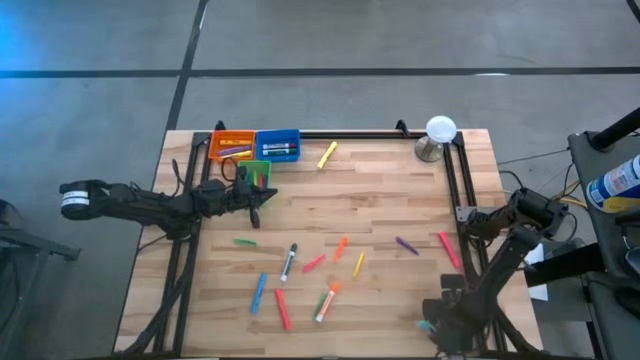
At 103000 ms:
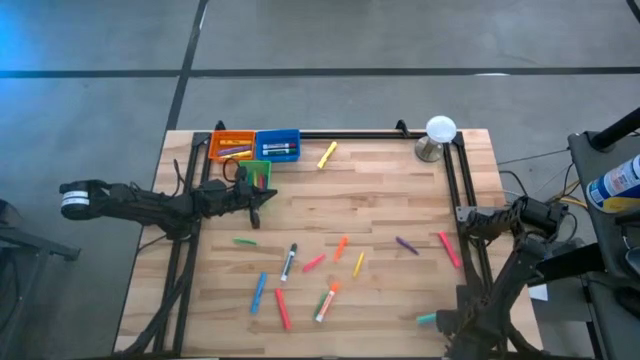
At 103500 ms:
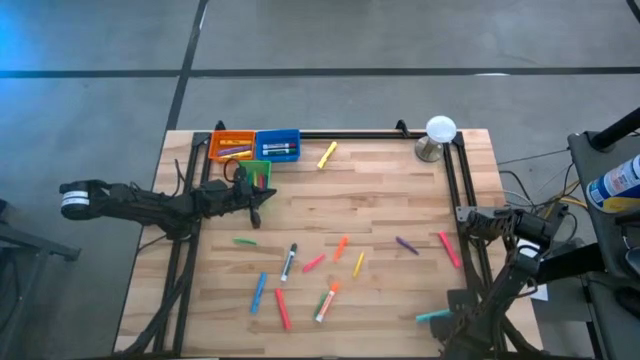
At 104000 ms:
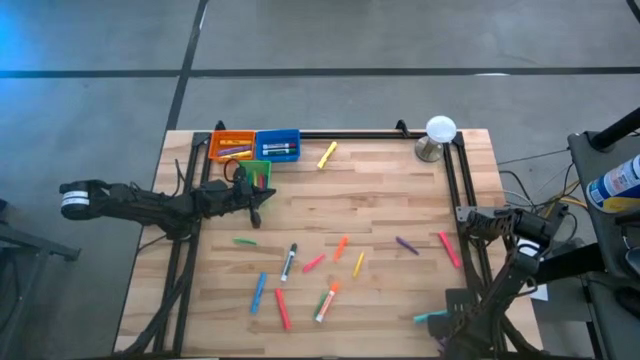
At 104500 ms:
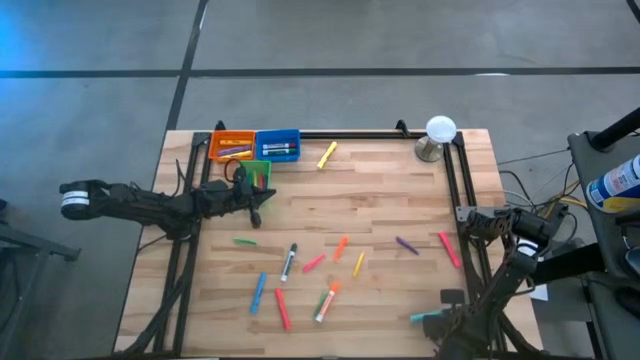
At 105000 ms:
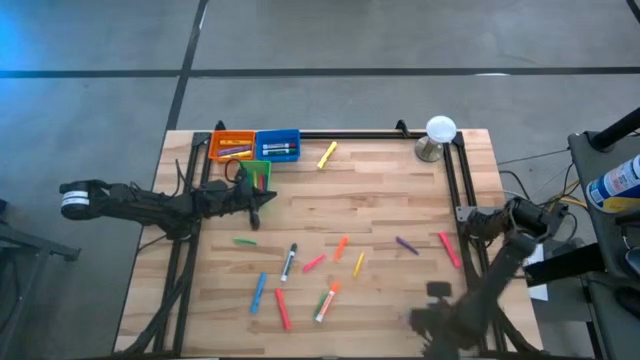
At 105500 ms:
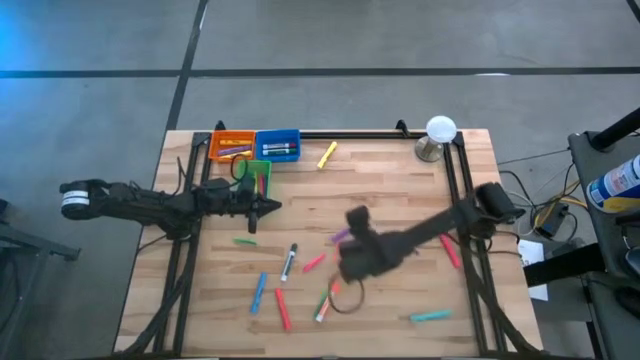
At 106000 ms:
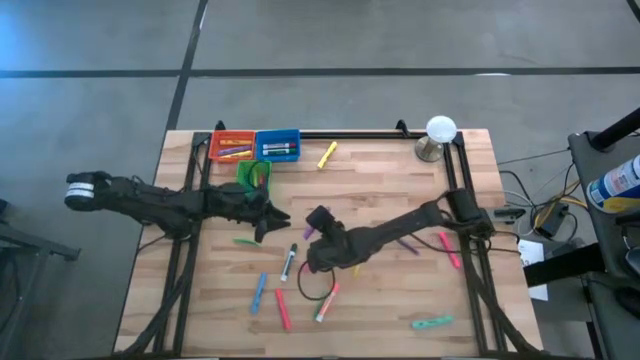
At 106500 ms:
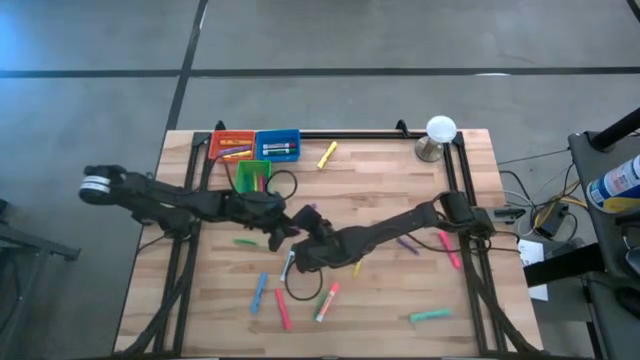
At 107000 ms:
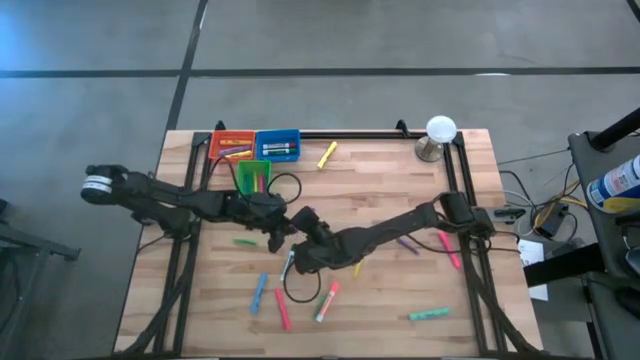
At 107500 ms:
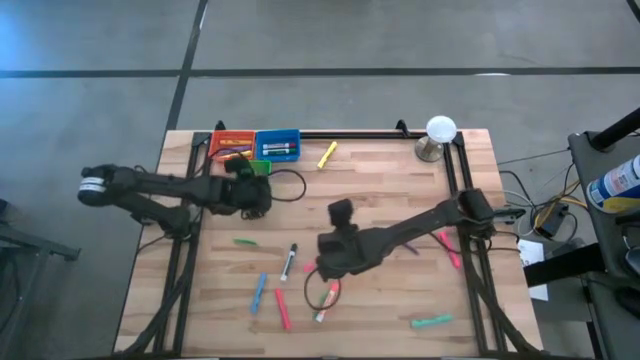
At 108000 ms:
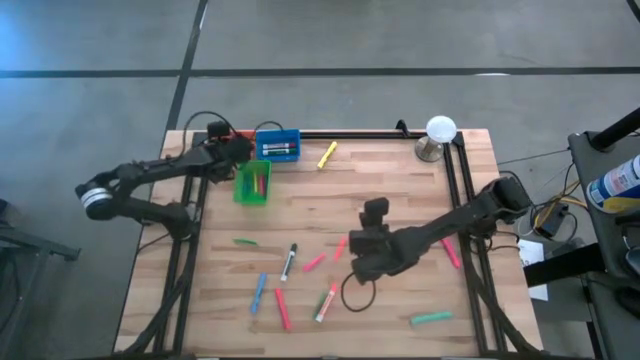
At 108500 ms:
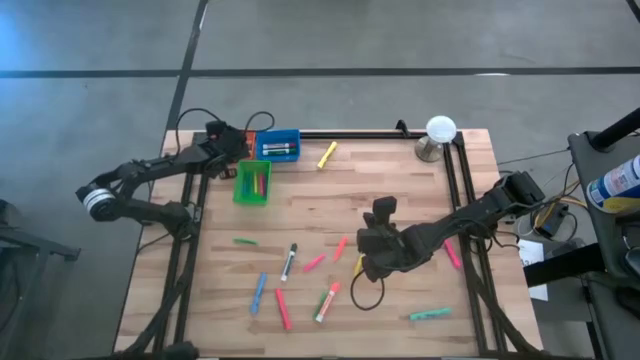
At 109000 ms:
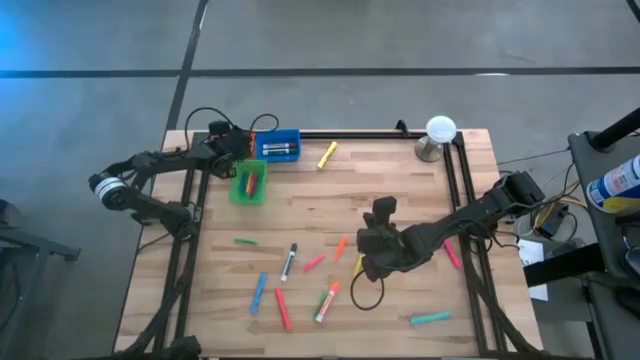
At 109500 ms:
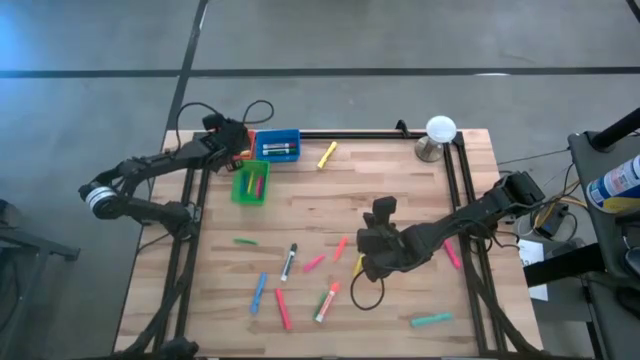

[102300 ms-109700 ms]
Task: Pick & Place Markers
Put the purple highlighter into the orange bin

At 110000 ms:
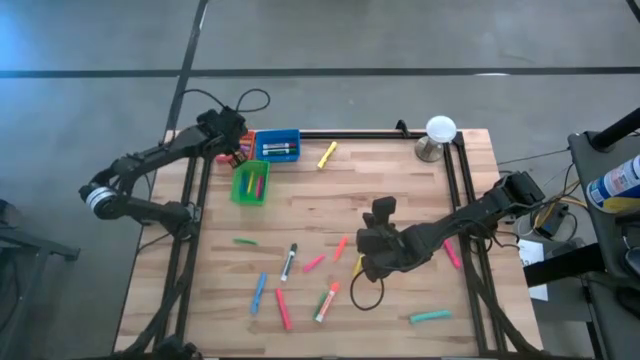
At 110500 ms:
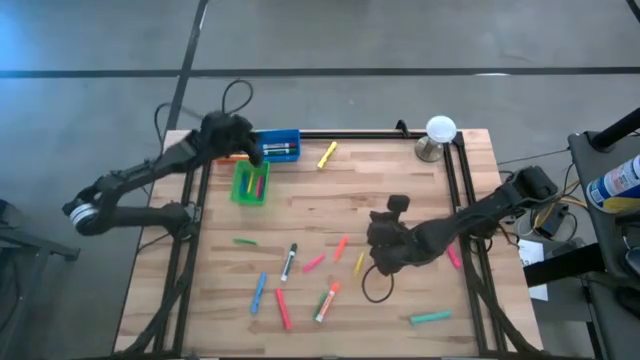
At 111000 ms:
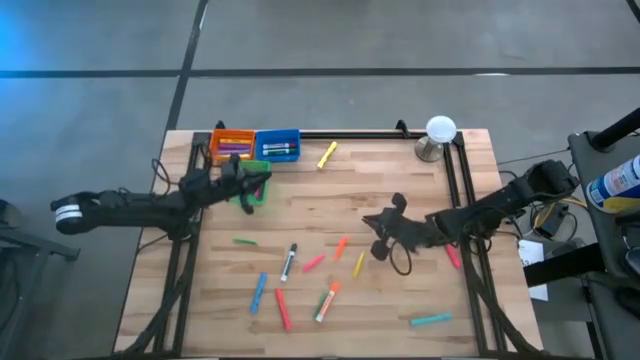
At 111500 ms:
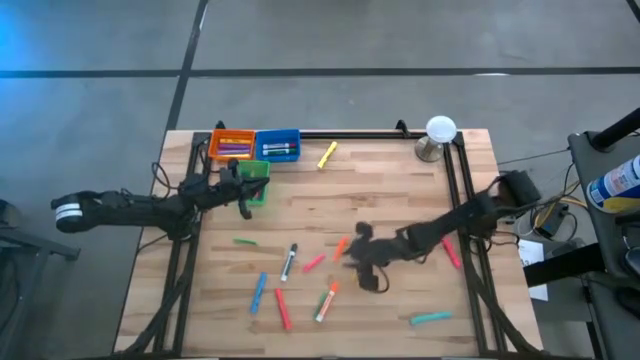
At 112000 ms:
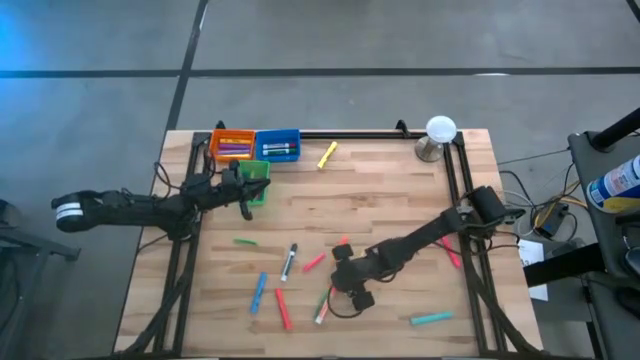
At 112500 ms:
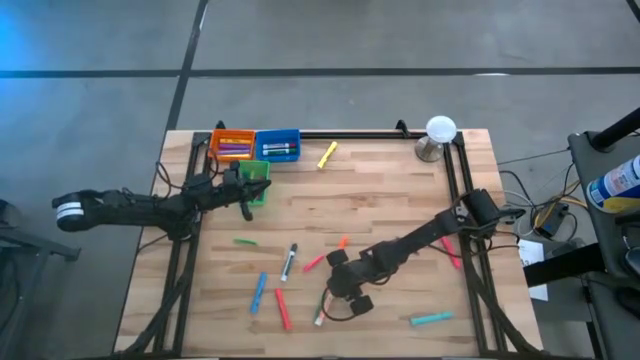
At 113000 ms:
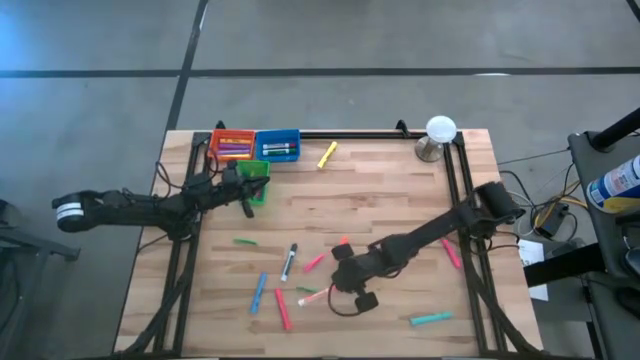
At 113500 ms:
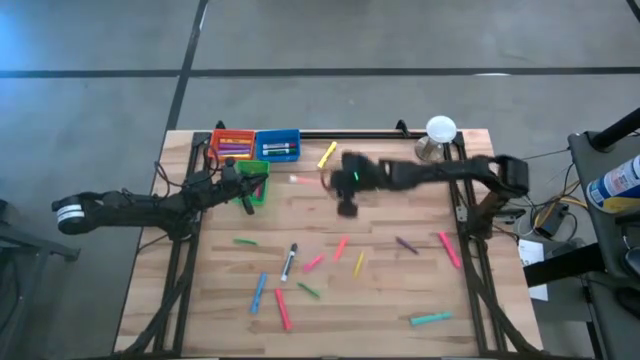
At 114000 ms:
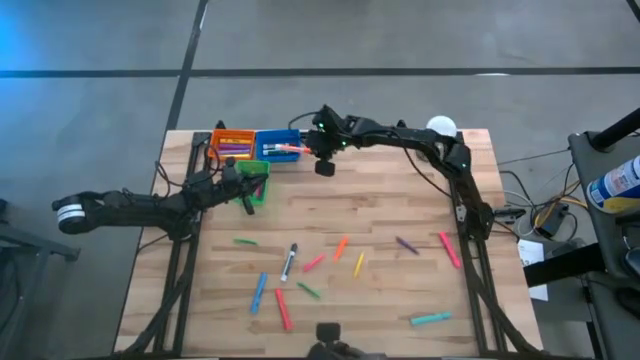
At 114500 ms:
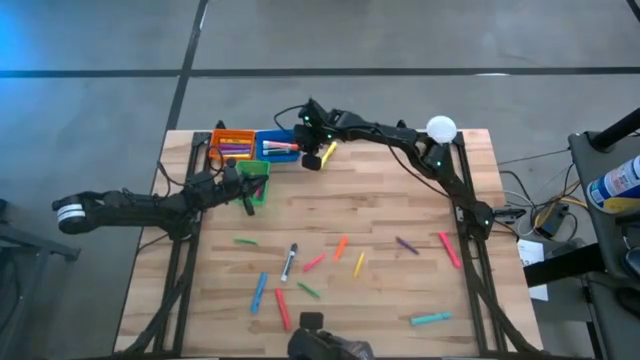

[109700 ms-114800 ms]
Put the orange marker into the blue bin

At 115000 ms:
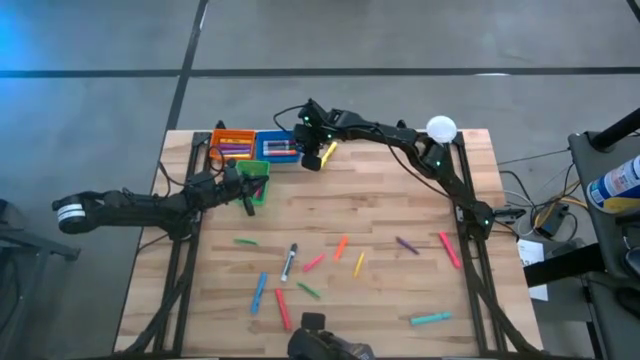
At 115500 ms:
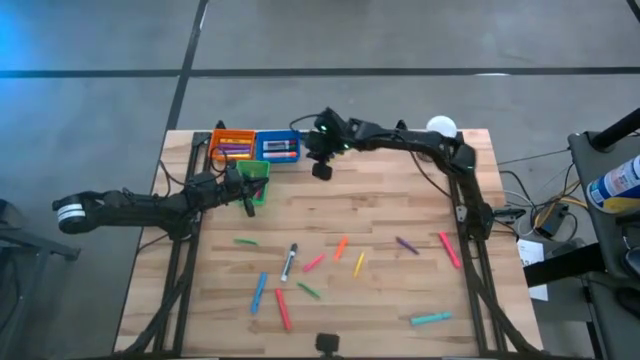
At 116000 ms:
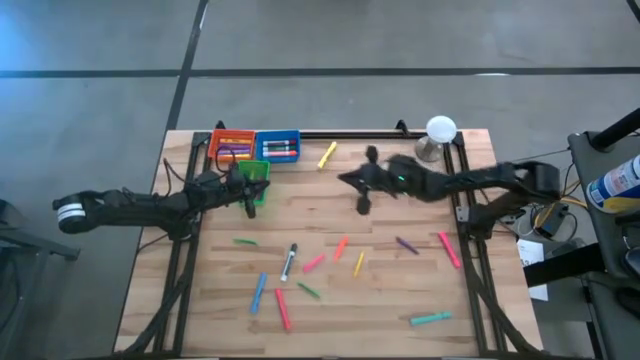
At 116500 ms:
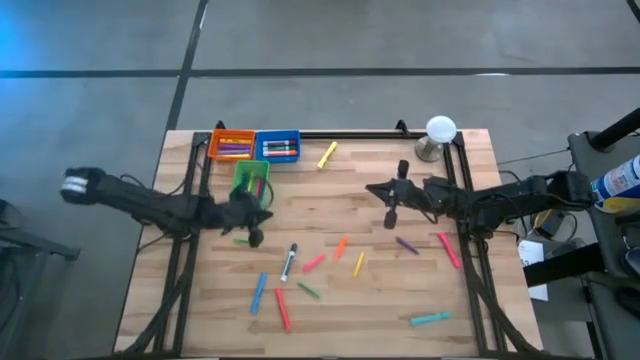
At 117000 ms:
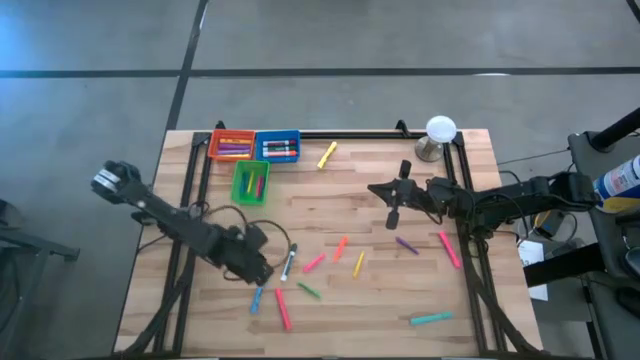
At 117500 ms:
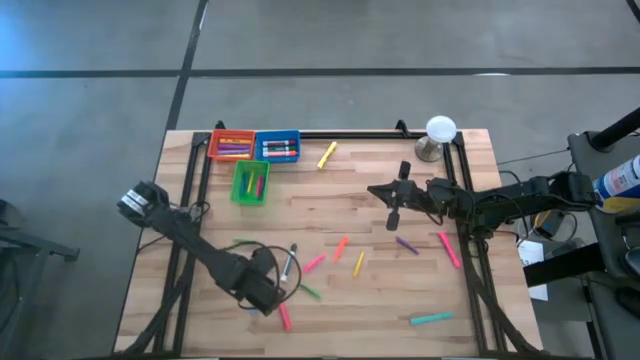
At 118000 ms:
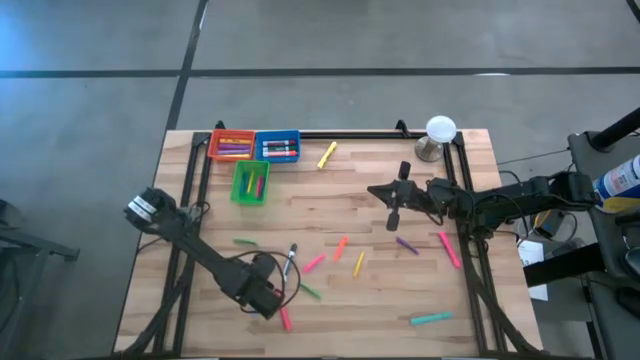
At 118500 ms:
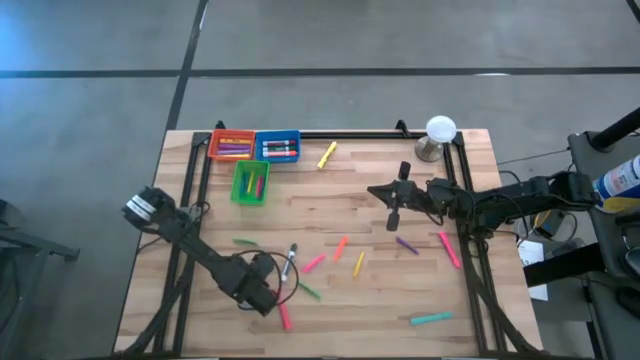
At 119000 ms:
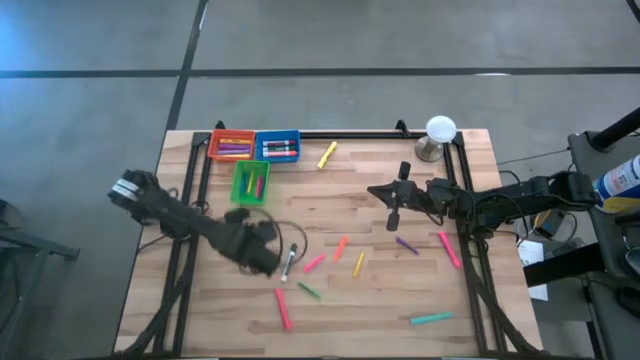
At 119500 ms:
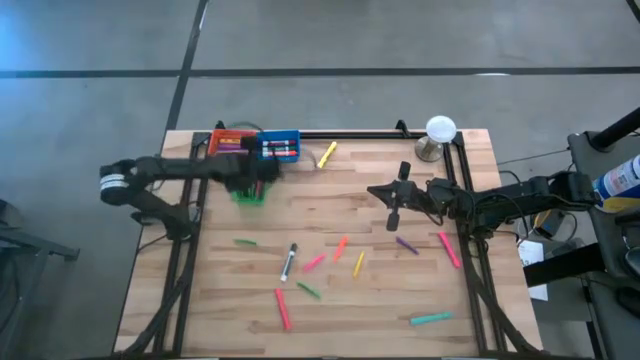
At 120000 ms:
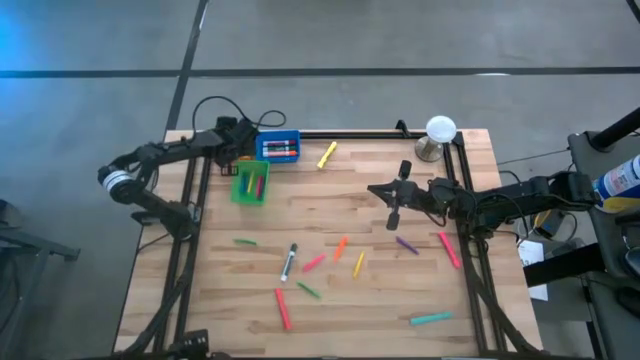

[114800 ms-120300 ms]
Put the dark blue highlighter into the orange bin

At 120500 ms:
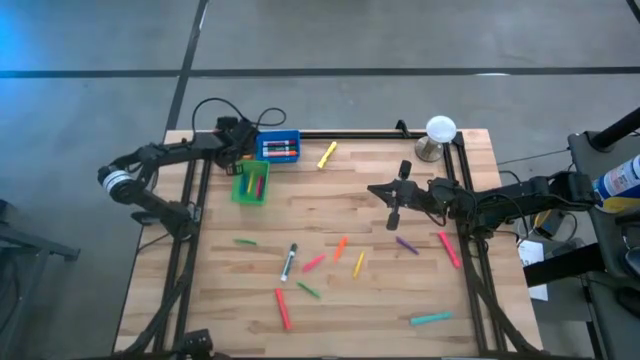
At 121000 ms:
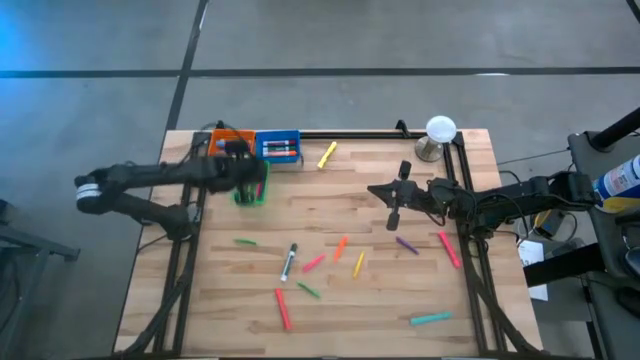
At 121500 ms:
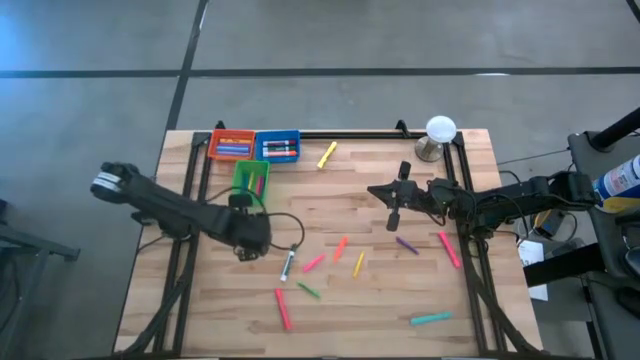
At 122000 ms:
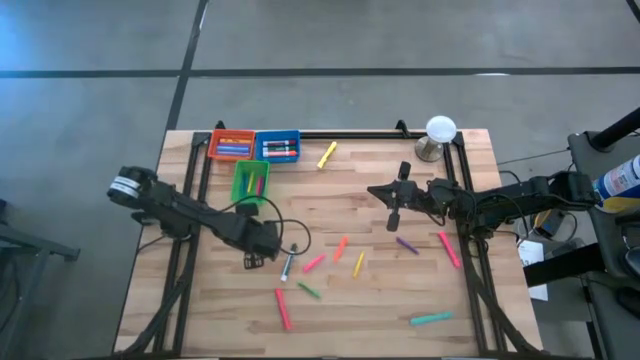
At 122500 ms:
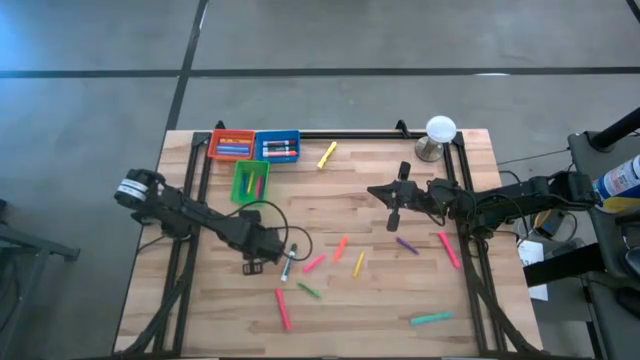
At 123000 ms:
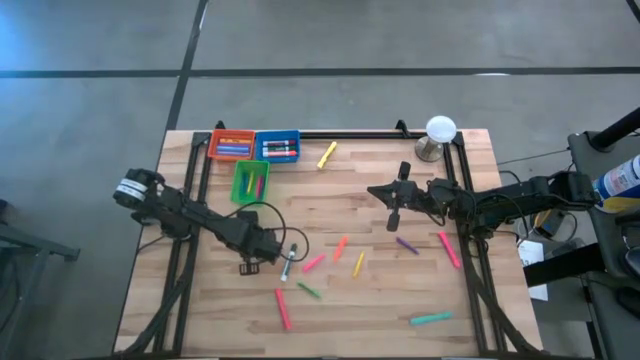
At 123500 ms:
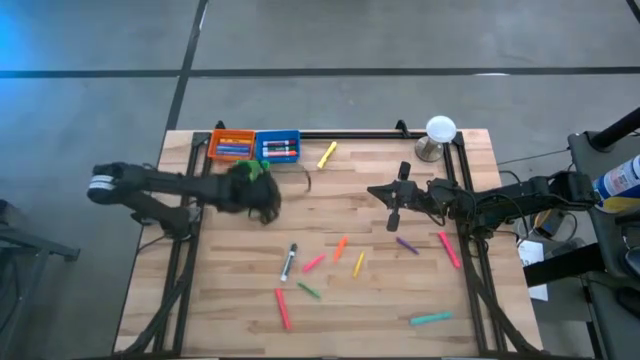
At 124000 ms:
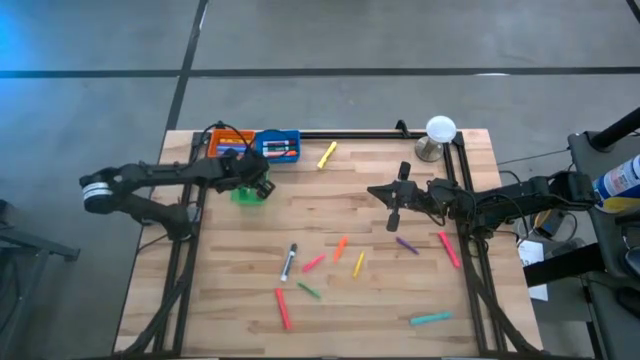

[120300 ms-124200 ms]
Put the green pen into the green bin
